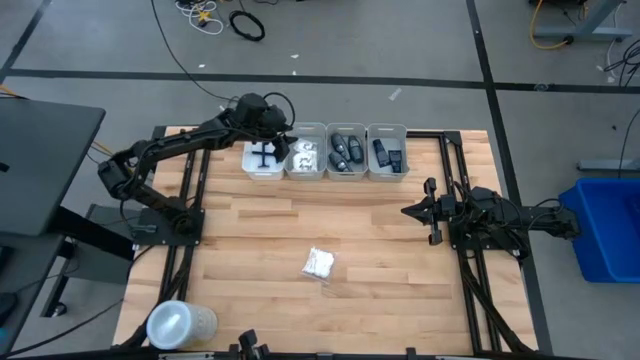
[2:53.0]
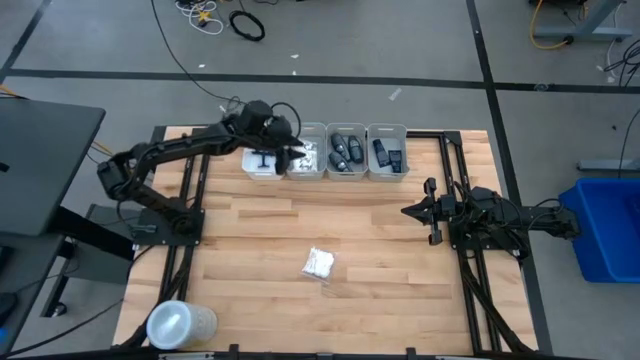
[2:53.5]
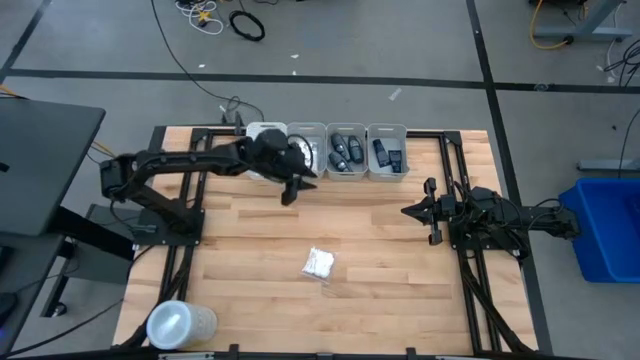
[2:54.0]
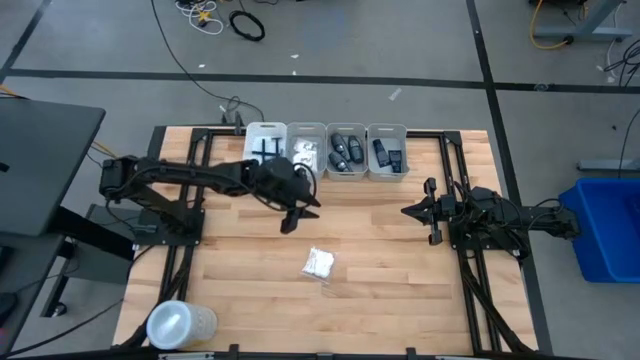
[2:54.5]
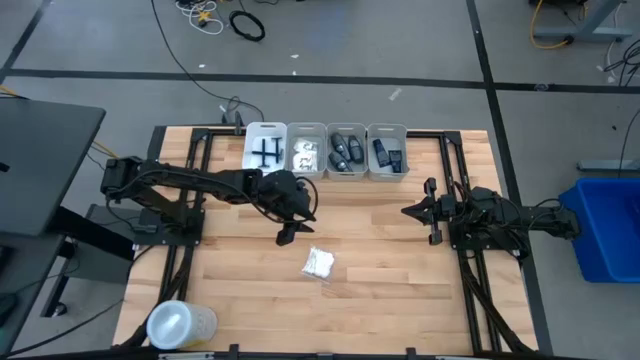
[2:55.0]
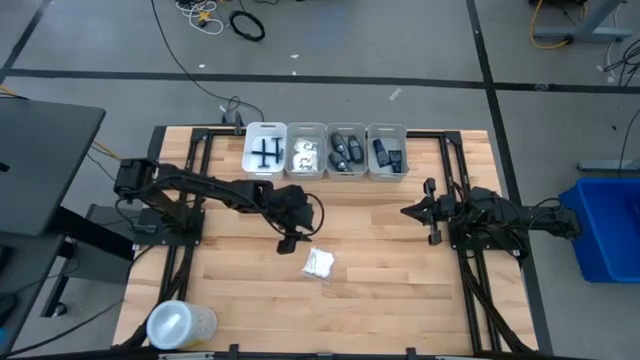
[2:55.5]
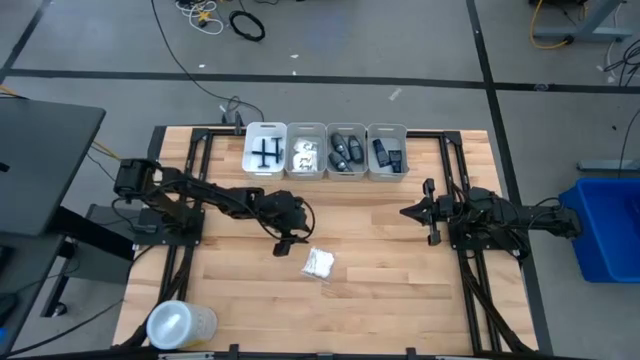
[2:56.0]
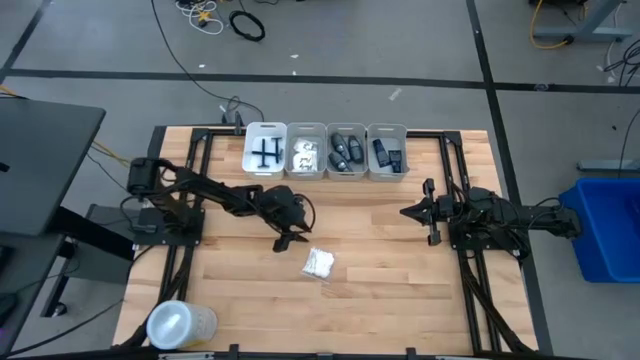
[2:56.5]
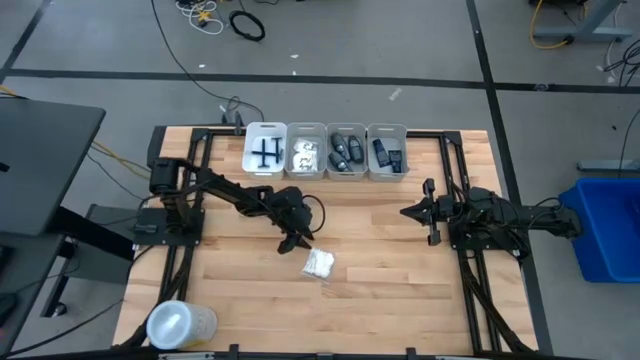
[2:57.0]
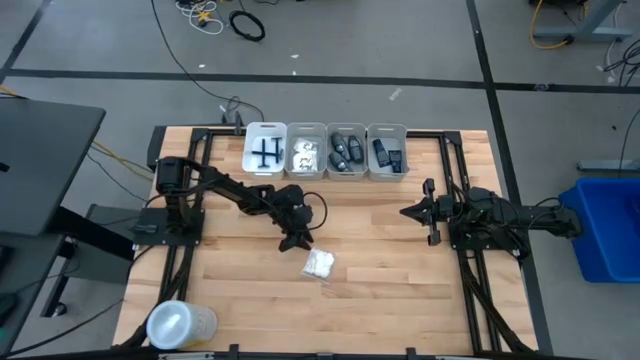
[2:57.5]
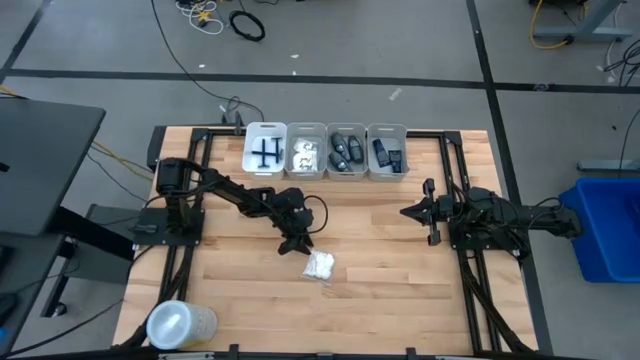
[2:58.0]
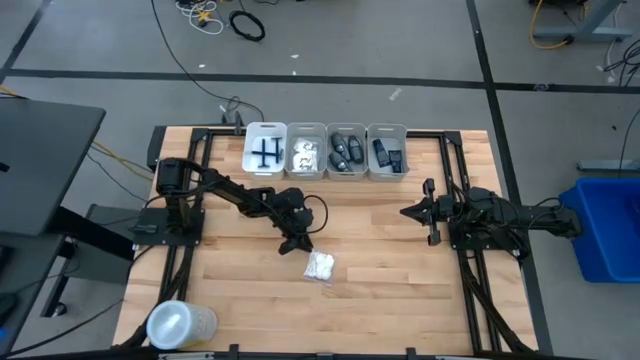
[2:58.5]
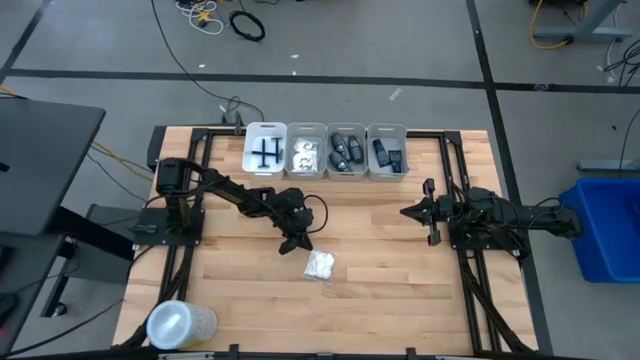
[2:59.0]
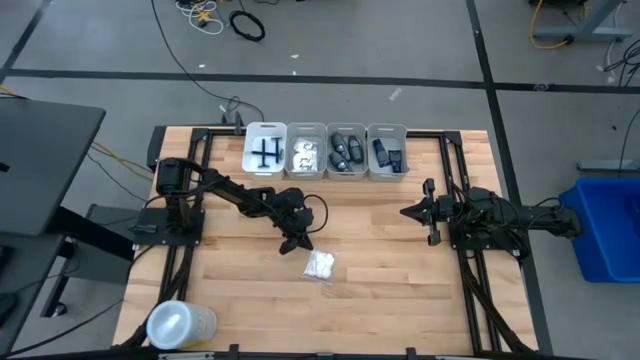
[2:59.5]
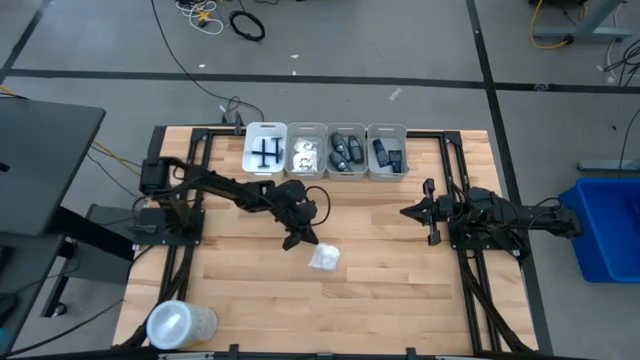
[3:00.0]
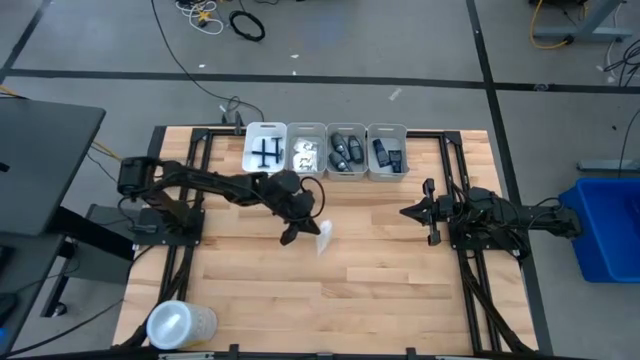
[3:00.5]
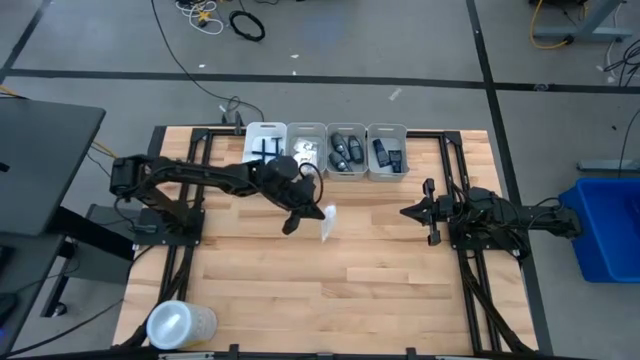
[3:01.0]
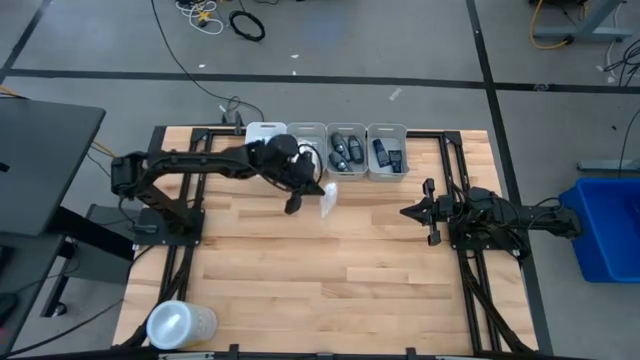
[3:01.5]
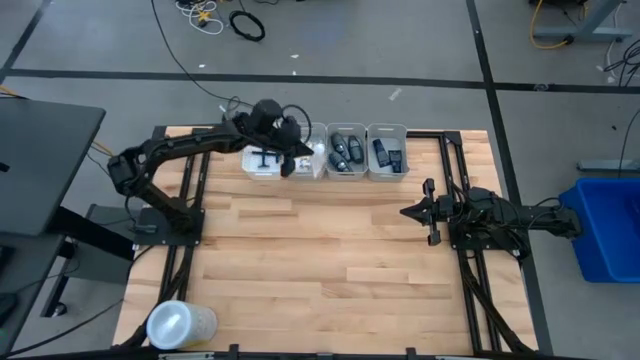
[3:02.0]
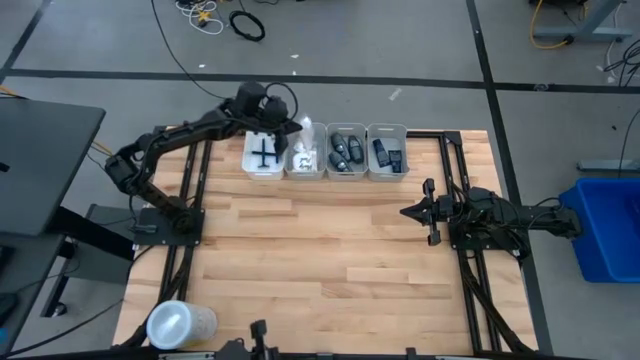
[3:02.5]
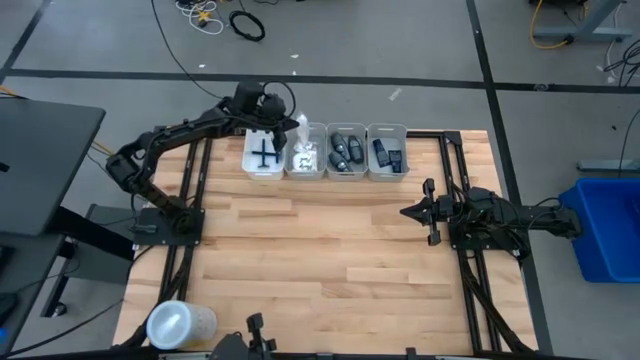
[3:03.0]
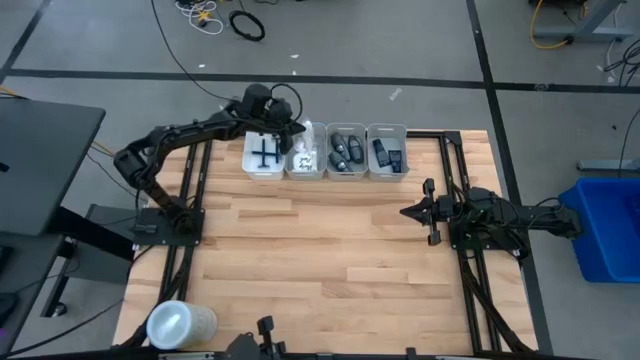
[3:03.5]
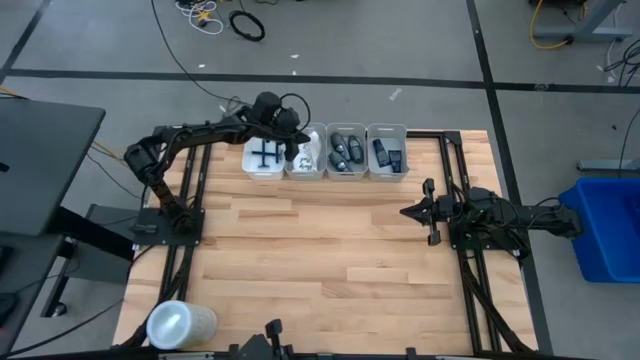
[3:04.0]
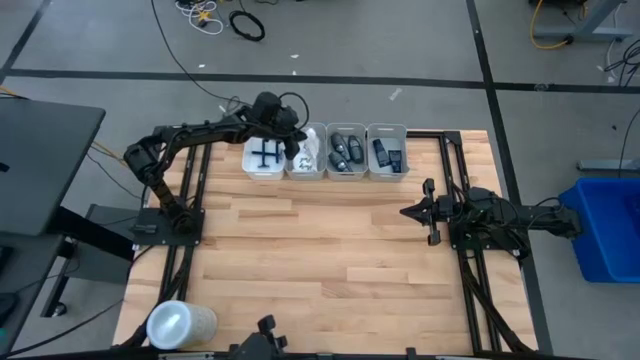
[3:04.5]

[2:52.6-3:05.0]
Task: Pick & Place Travel size toiletries
Put the white cotton pack into the left gray bin

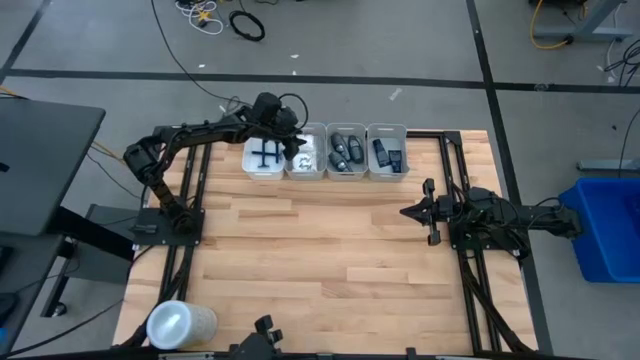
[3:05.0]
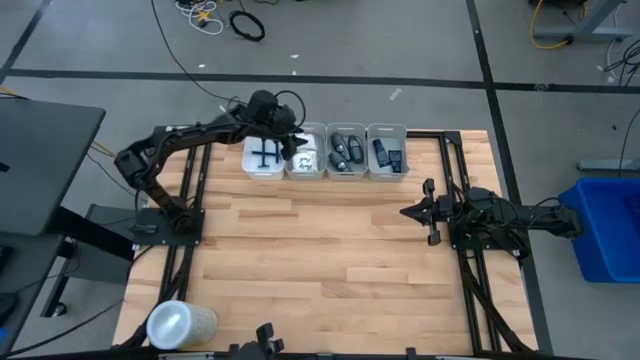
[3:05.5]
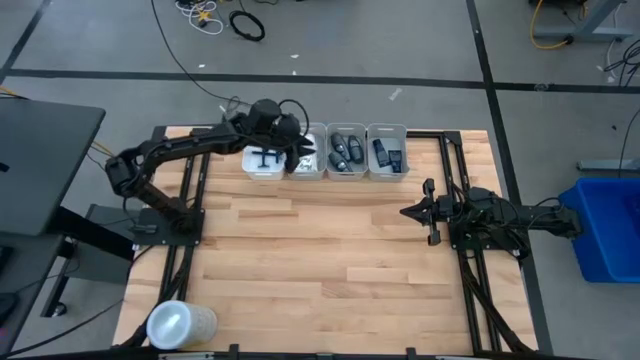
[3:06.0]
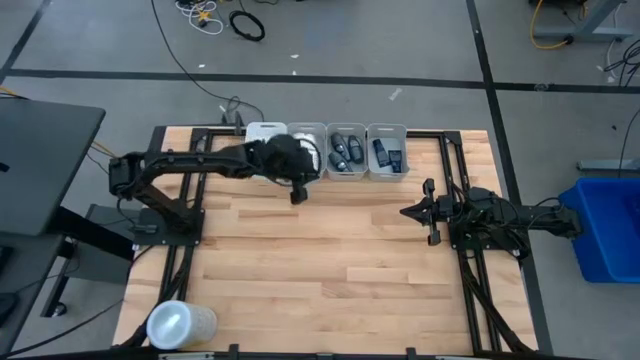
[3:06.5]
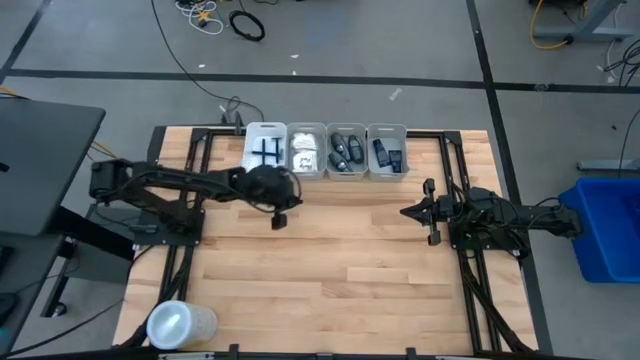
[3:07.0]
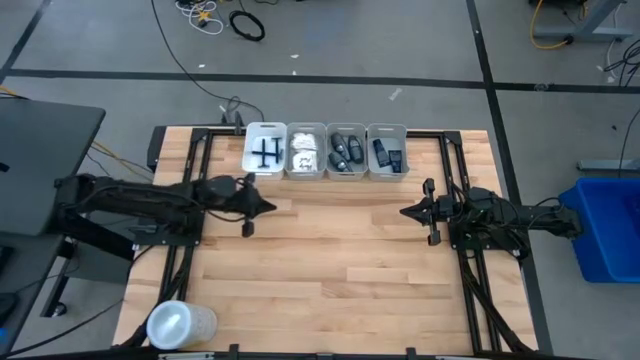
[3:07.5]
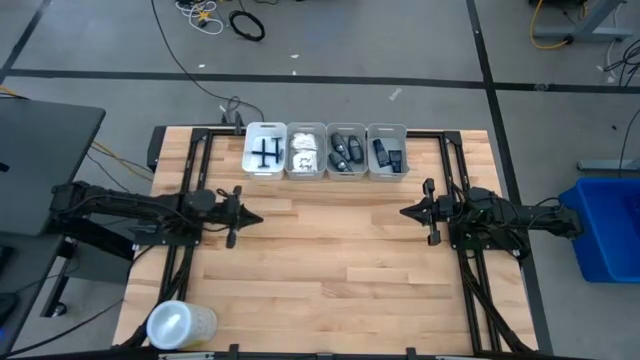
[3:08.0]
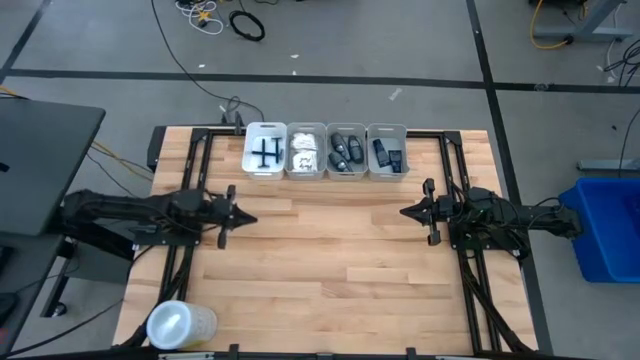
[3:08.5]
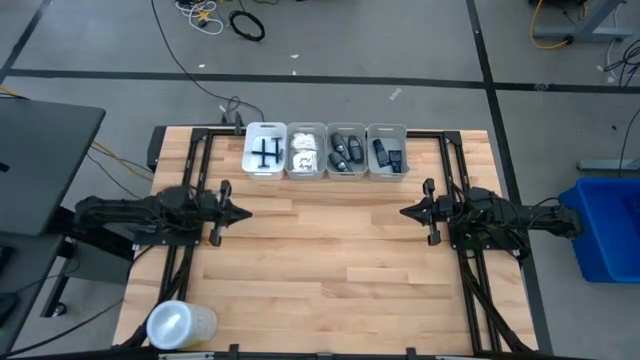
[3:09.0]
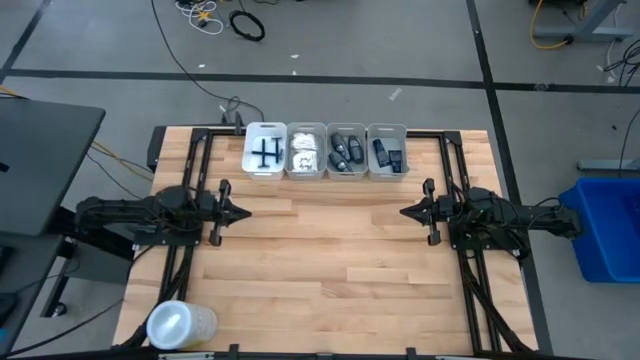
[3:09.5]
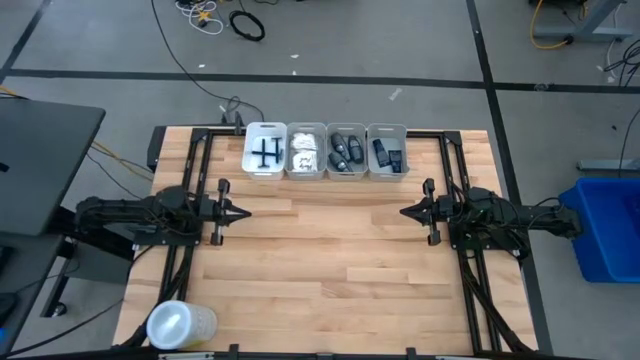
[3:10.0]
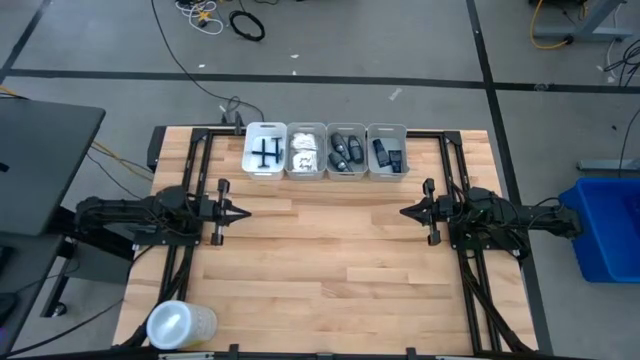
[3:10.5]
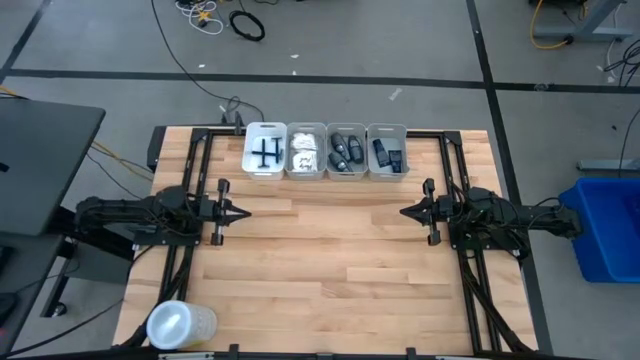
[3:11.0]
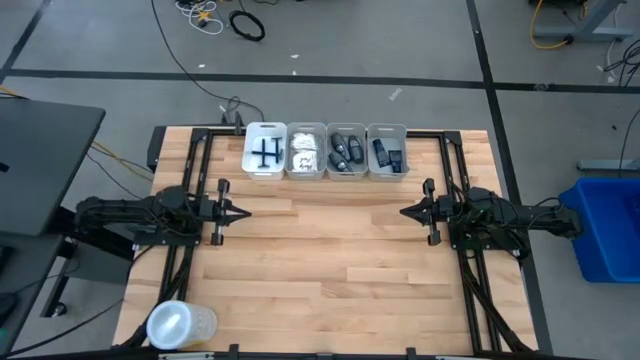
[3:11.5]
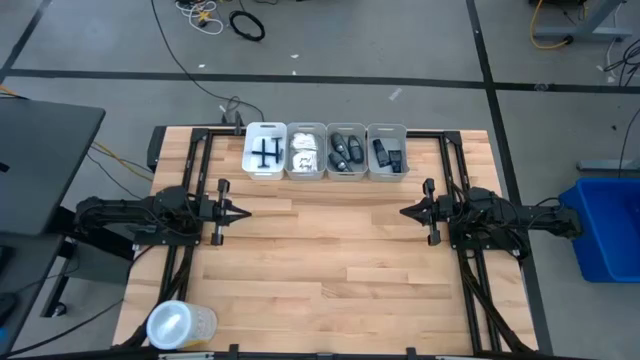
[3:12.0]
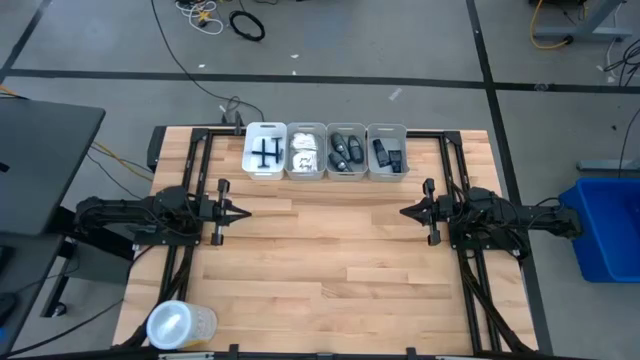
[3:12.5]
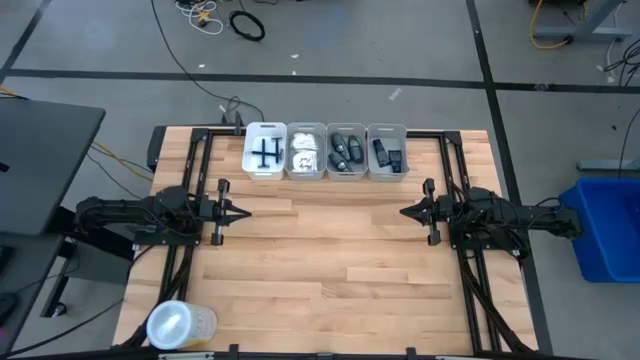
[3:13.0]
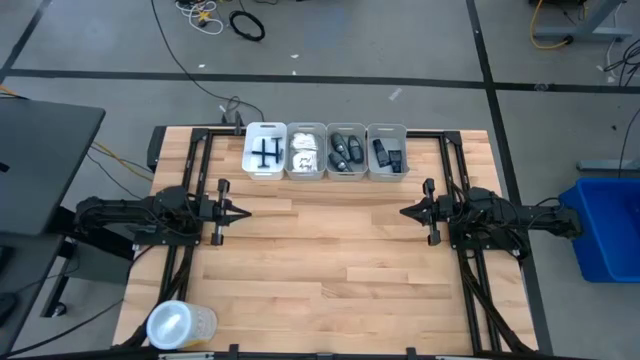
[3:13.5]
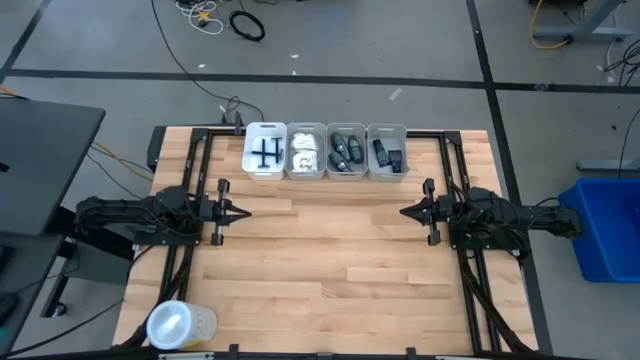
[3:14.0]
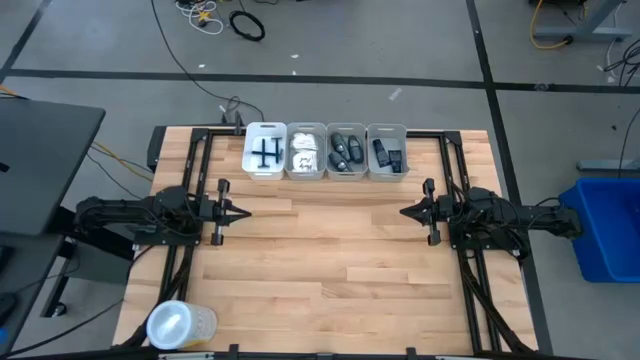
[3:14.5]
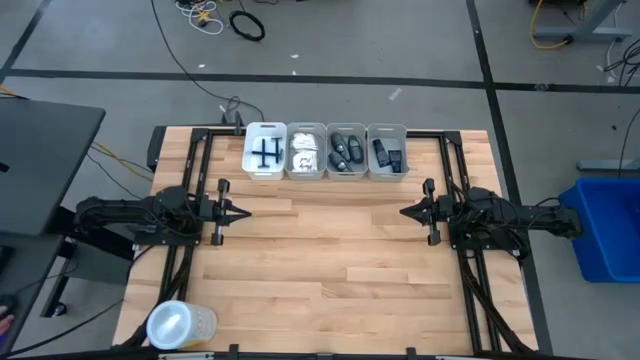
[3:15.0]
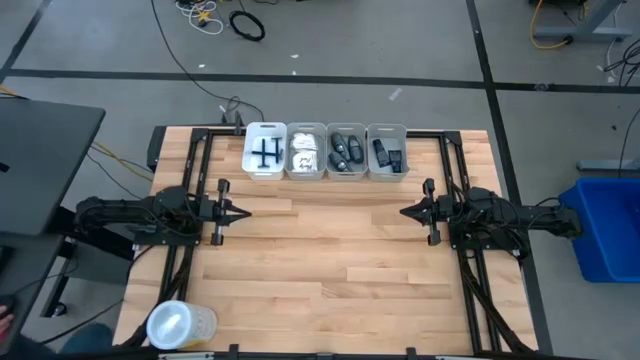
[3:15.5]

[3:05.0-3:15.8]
Return to Home Position
